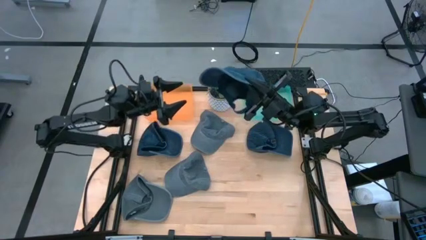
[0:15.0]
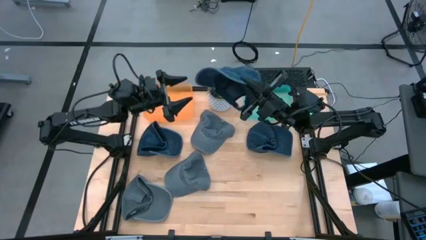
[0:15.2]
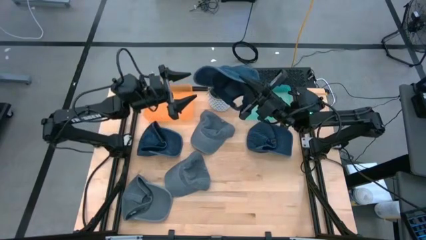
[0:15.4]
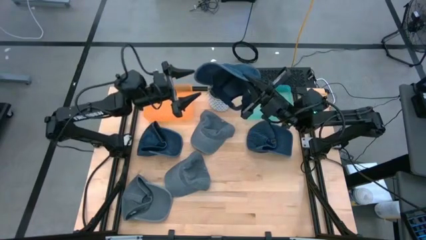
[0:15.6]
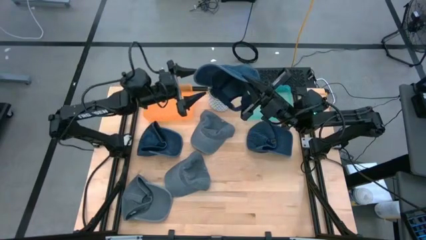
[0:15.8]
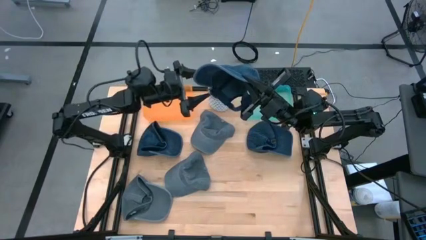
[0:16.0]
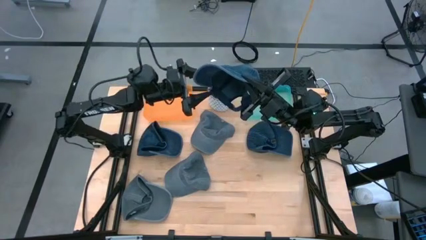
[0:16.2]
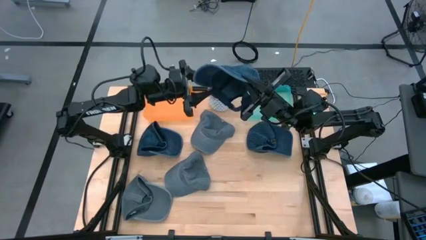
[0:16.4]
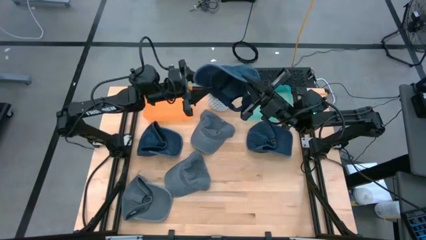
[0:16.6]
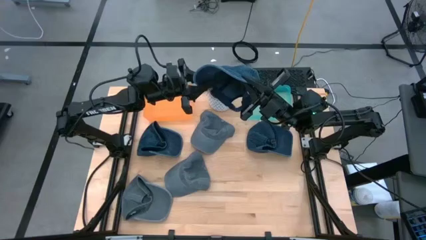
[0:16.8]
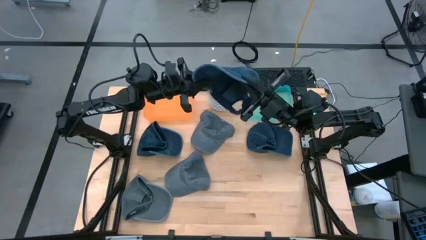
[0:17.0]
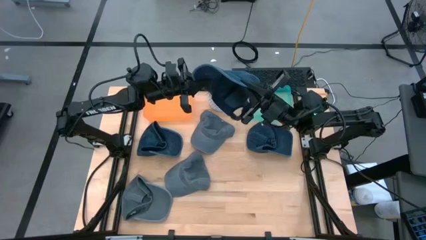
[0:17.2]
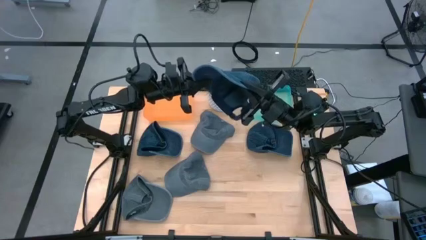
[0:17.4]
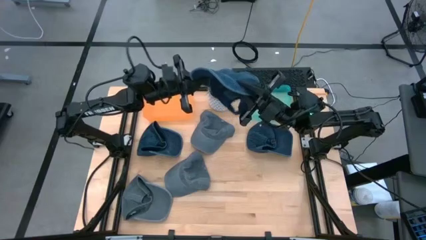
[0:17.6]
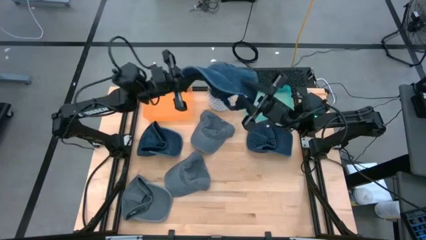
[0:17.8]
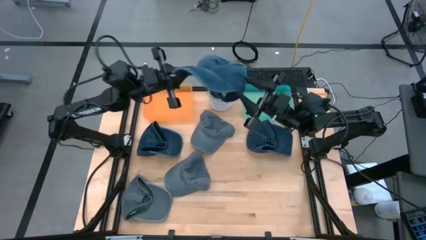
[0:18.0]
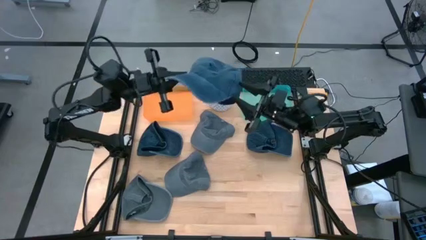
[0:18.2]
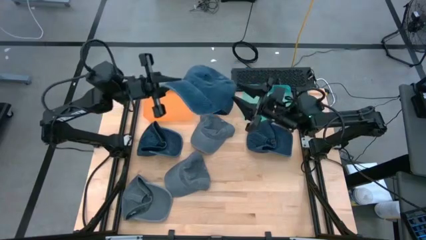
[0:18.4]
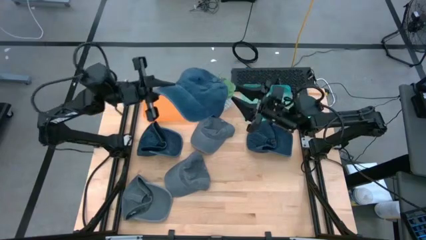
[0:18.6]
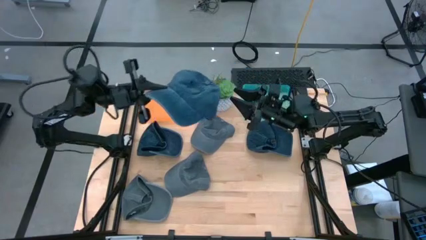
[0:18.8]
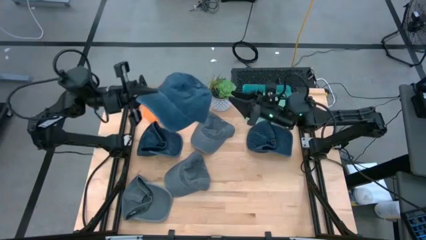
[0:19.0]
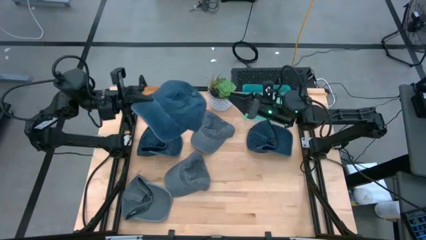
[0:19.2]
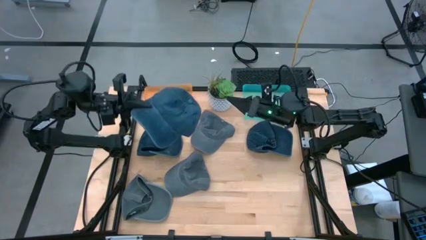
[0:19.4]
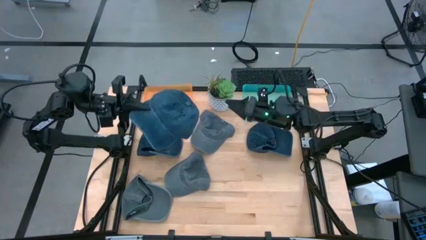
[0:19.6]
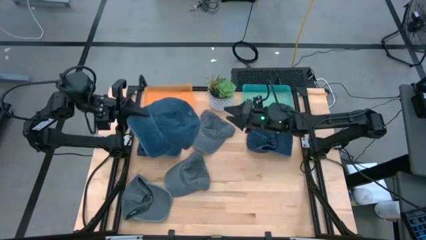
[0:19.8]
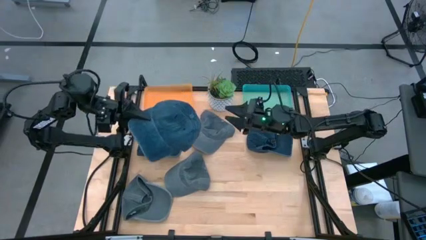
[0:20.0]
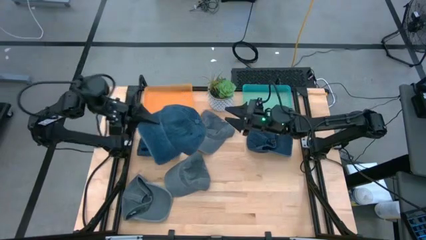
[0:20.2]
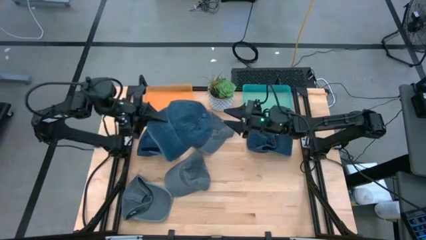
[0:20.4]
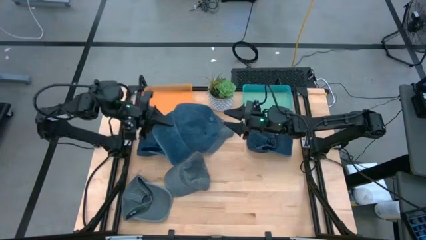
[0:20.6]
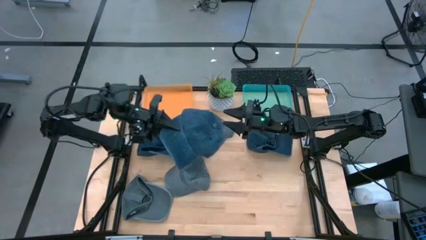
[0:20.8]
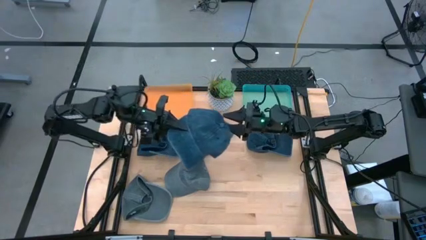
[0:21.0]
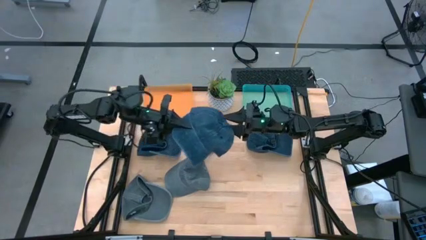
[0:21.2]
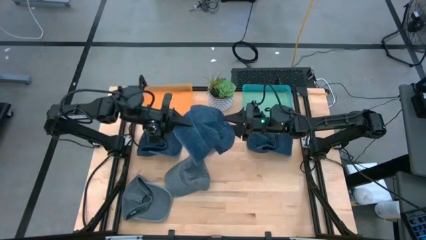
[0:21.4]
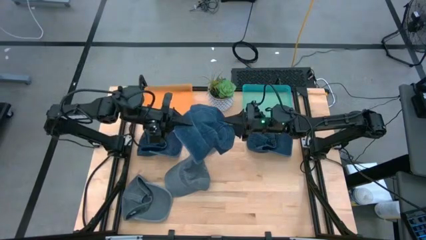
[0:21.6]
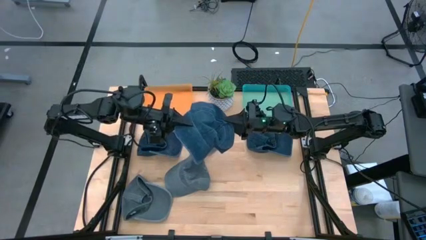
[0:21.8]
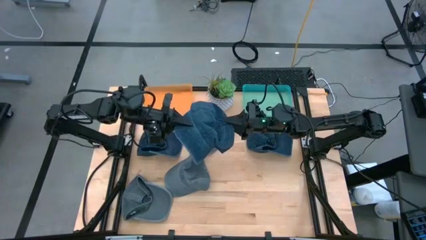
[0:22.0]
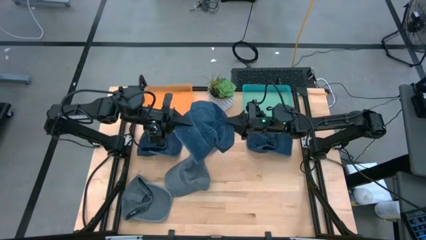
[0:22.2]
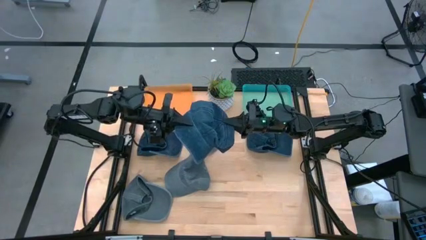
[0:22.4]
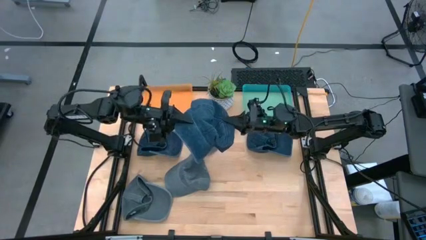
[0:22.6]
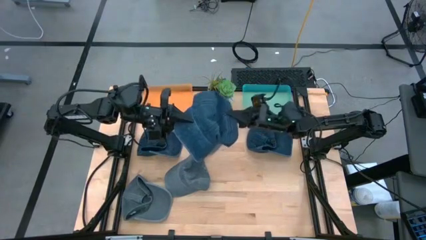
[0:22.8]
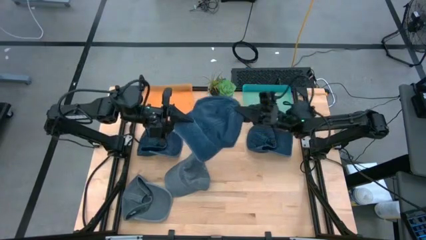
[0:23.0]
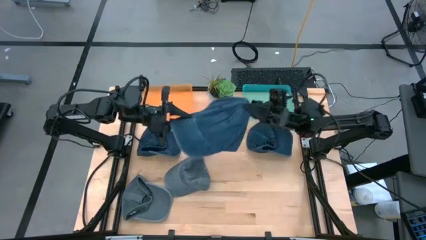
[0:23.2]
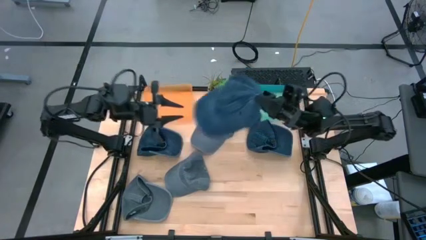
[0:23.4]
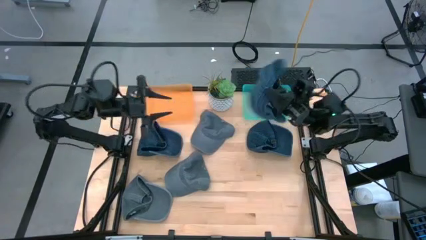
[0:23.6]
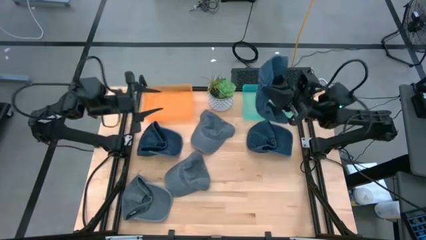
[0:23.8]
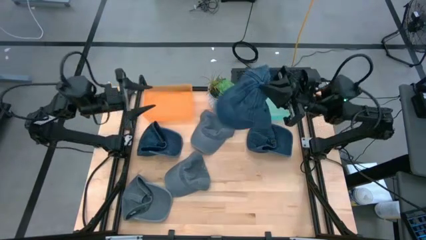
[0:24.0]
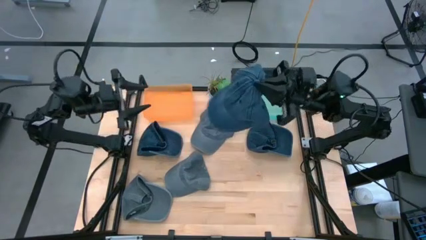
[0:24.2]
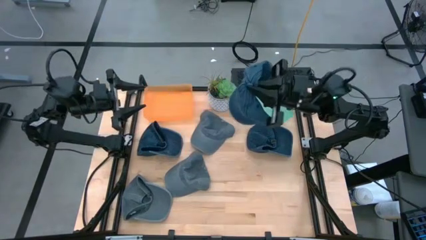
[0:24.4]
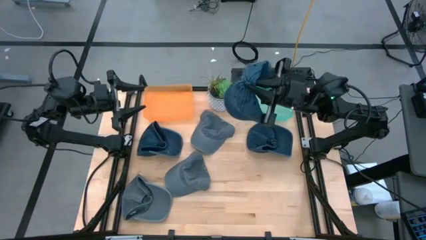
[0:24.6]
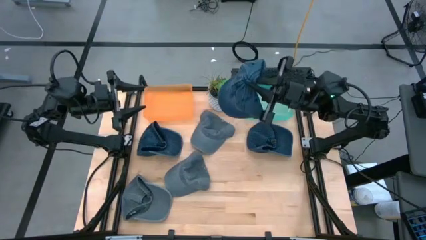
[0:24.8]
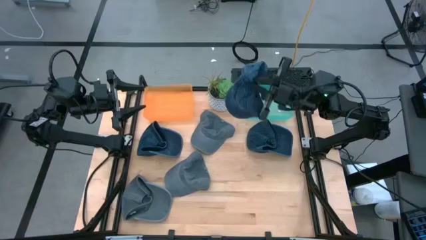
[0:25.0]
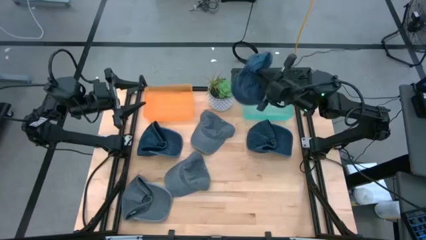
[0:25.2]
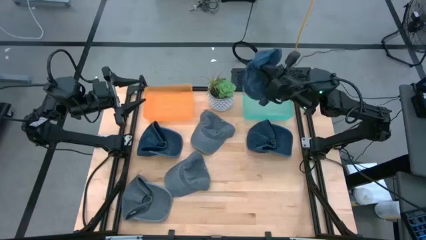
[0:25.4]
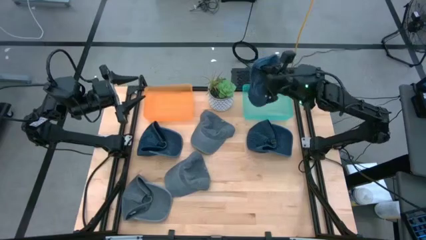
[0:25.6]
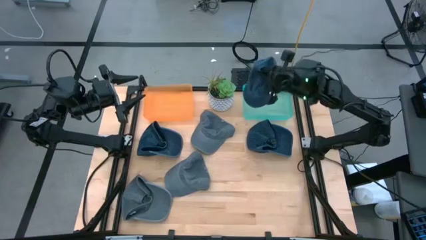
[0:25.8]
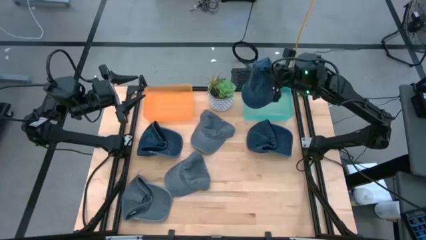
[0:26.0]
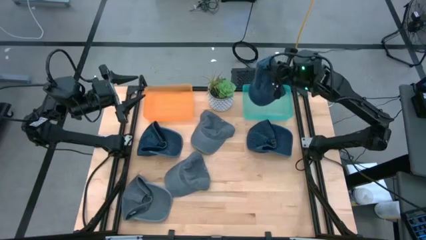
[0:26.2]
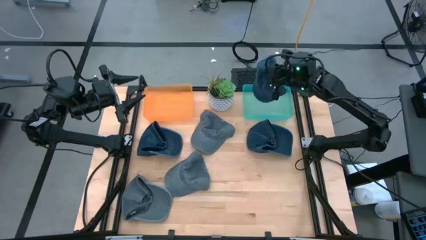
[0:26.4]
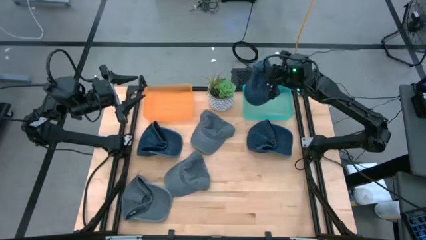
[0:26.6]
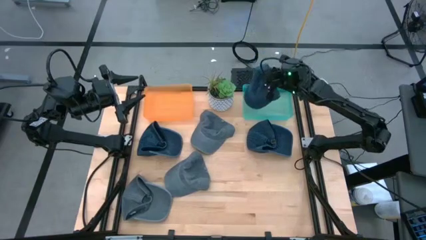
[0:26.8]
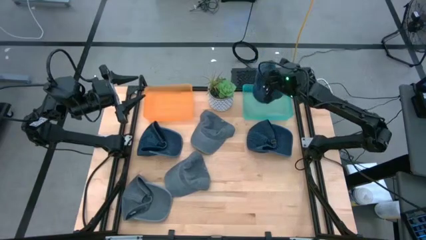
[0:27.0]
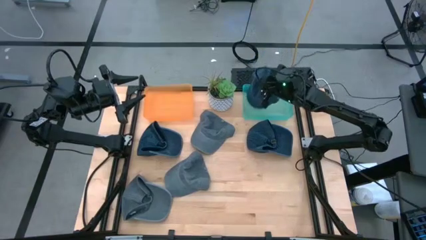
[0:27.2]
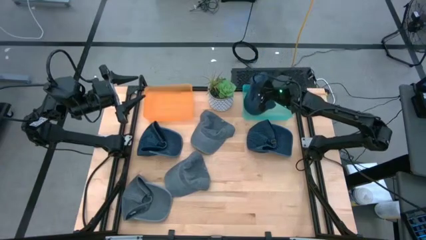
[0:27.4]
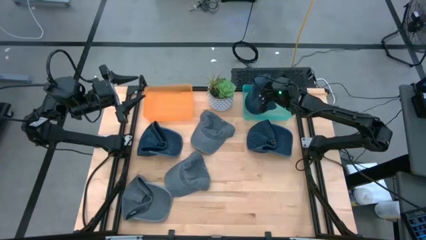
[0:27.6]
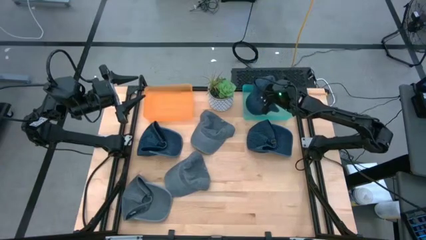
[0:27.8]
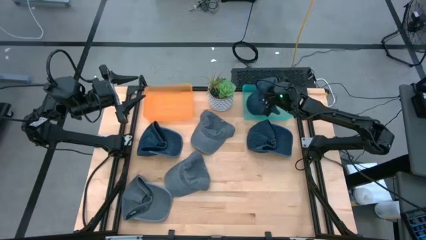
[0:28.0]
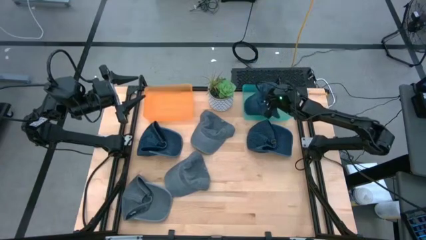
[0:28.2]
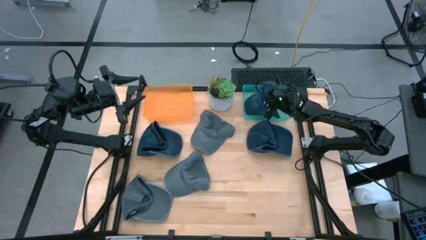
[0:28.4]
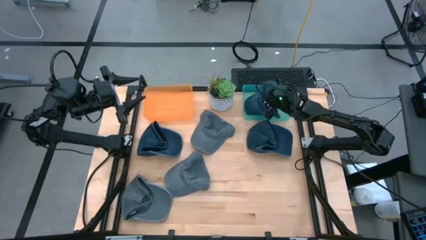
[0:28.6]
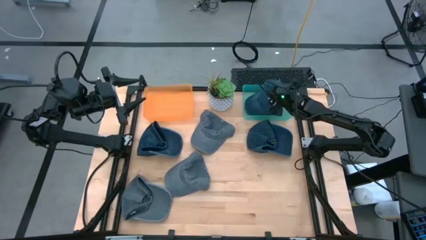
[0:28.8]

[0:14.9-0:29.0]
Task: Pick & Place hat
Put the bottom blue cap into the light blue bin
